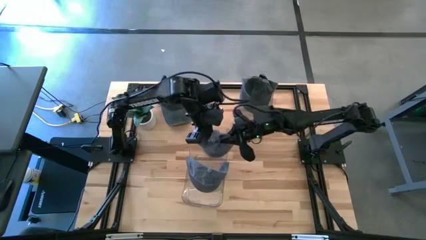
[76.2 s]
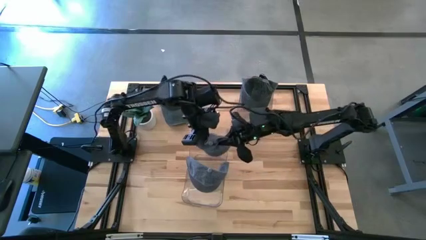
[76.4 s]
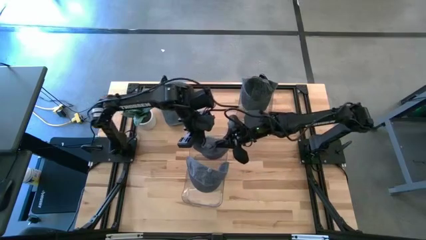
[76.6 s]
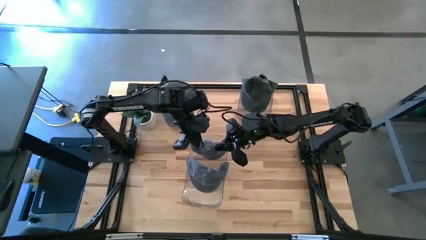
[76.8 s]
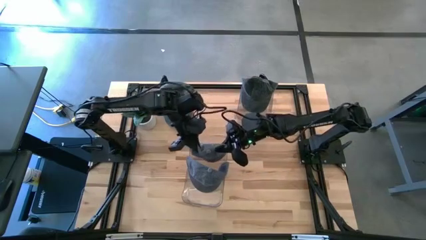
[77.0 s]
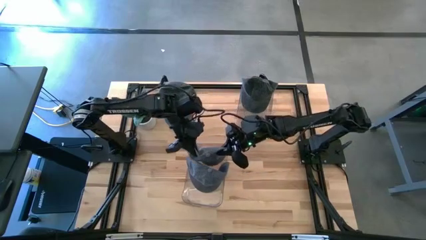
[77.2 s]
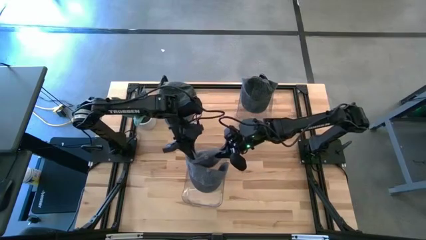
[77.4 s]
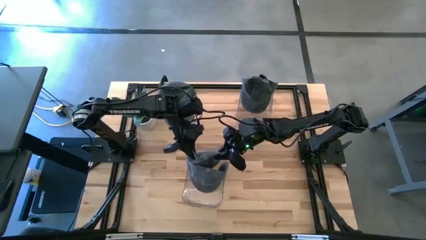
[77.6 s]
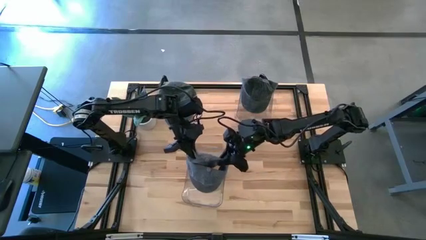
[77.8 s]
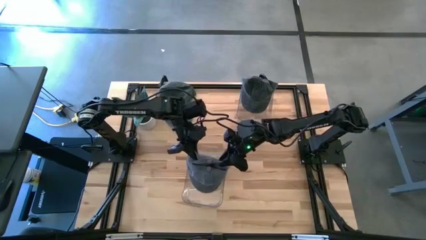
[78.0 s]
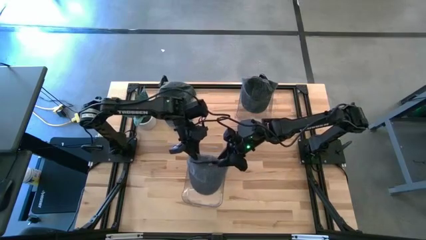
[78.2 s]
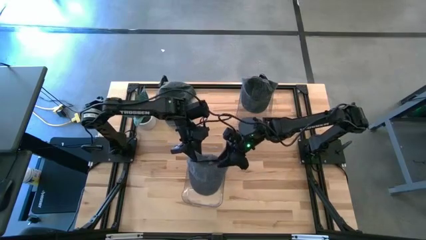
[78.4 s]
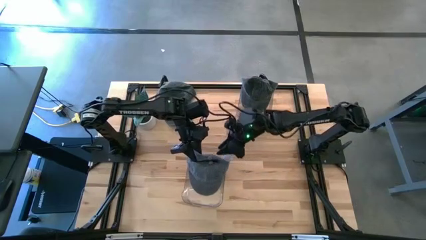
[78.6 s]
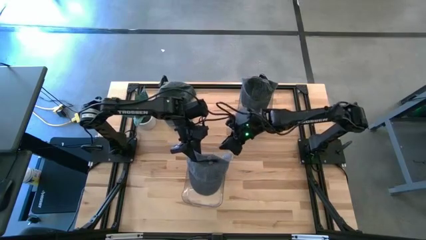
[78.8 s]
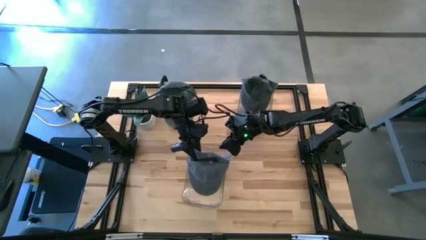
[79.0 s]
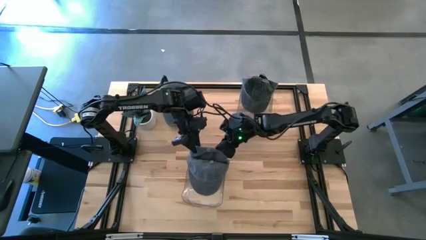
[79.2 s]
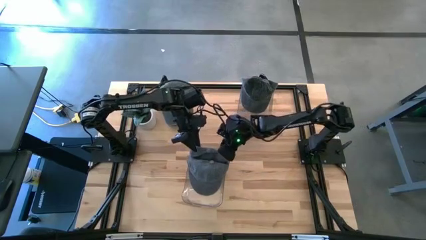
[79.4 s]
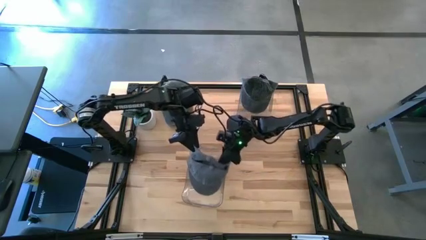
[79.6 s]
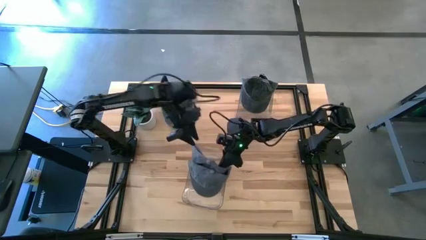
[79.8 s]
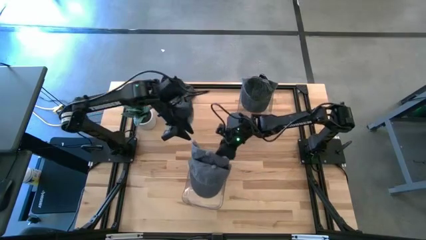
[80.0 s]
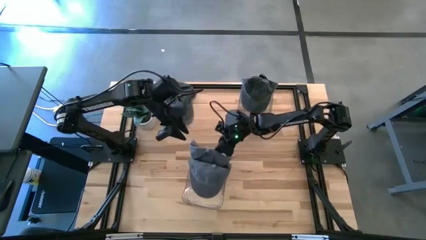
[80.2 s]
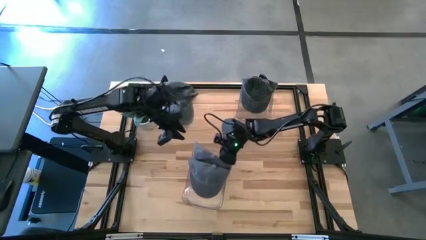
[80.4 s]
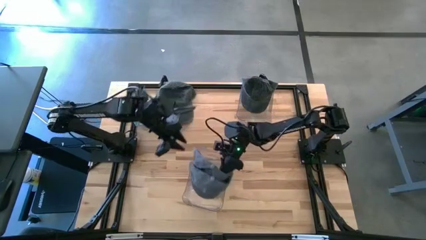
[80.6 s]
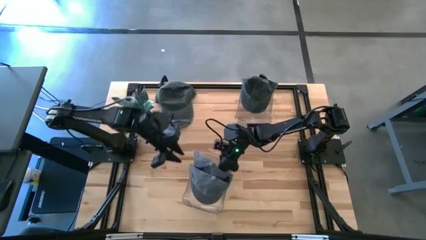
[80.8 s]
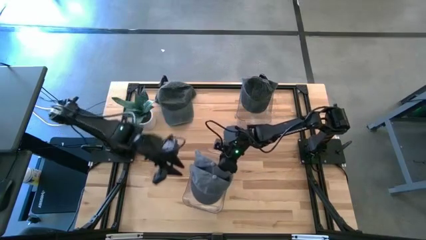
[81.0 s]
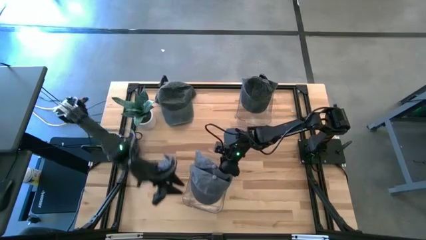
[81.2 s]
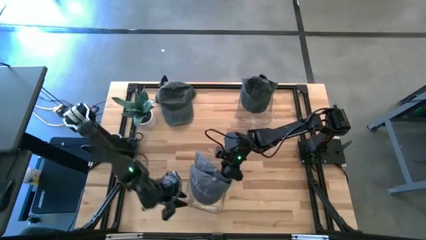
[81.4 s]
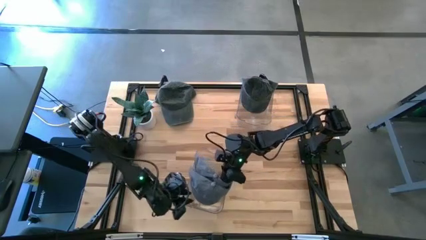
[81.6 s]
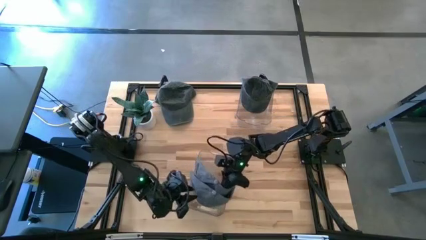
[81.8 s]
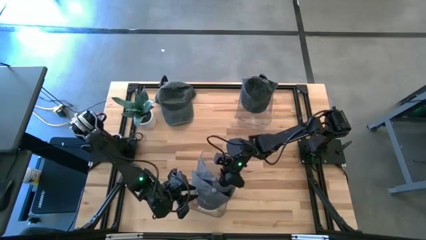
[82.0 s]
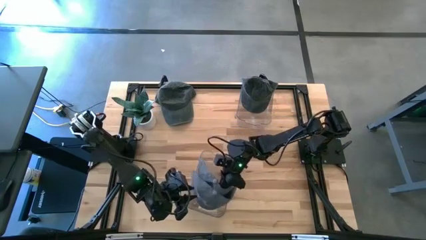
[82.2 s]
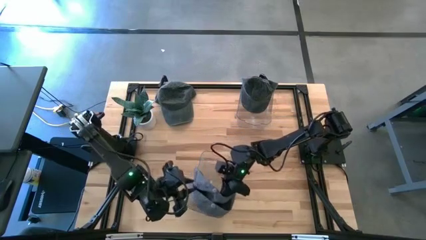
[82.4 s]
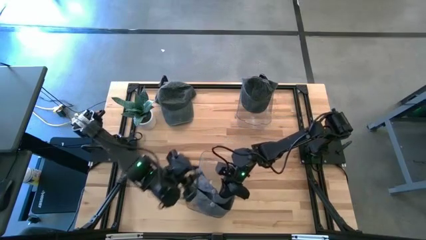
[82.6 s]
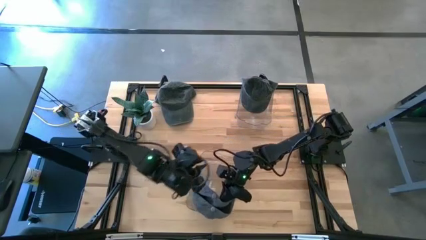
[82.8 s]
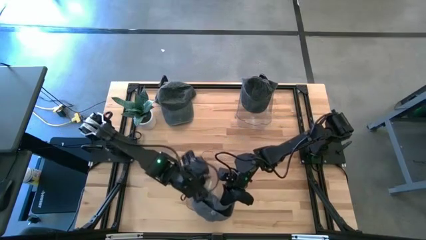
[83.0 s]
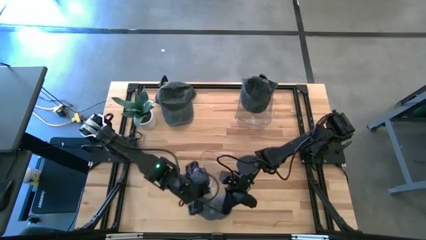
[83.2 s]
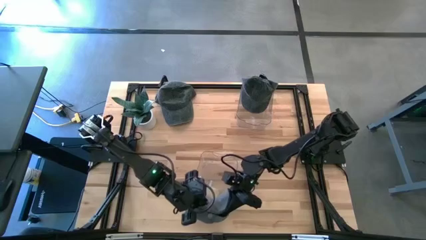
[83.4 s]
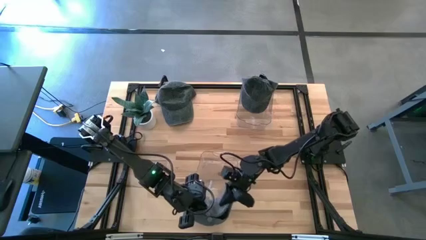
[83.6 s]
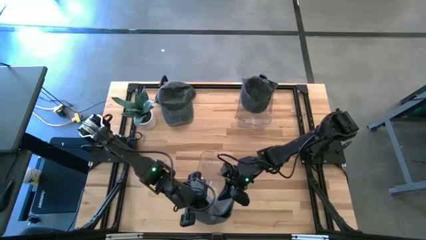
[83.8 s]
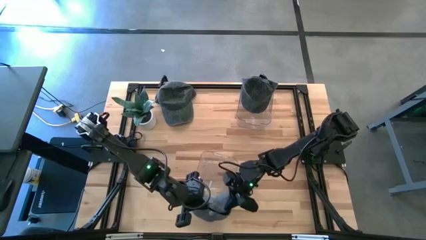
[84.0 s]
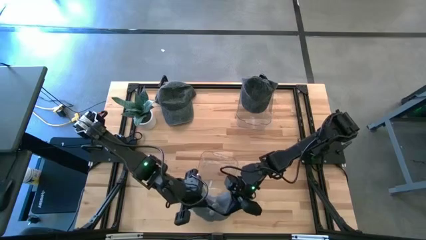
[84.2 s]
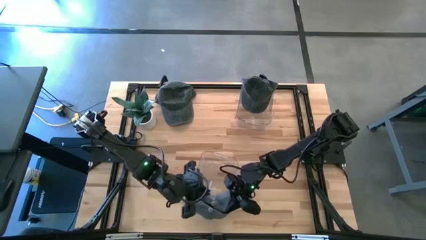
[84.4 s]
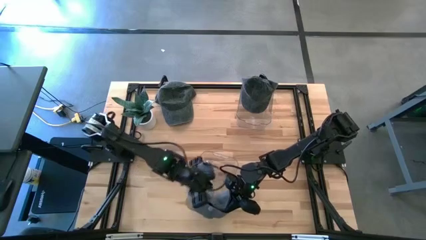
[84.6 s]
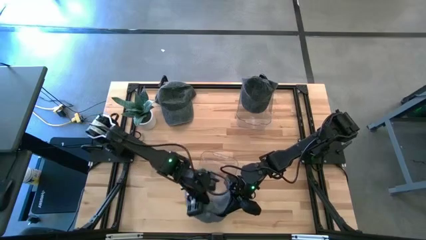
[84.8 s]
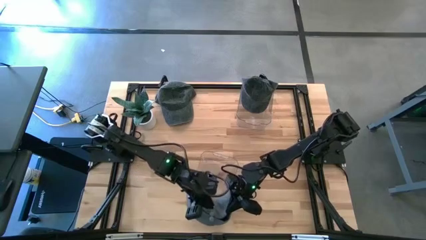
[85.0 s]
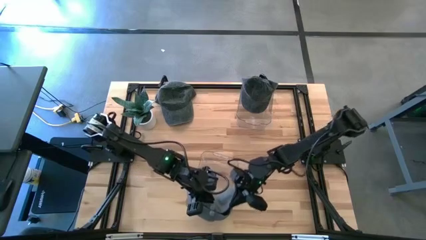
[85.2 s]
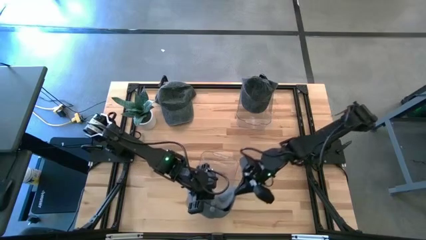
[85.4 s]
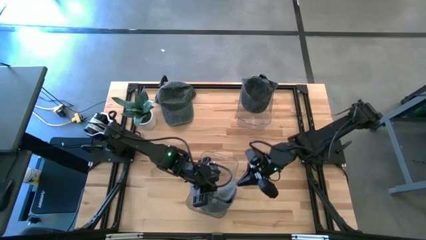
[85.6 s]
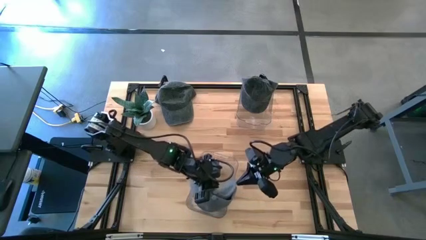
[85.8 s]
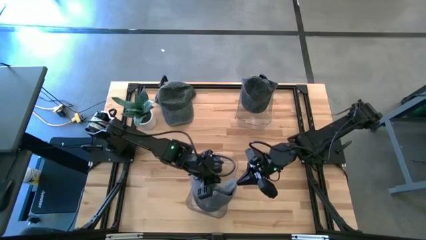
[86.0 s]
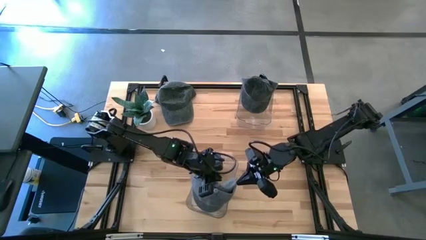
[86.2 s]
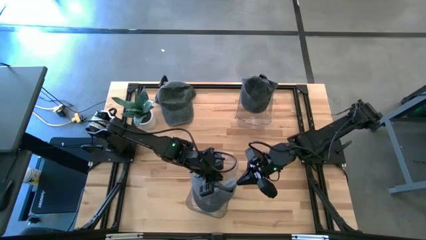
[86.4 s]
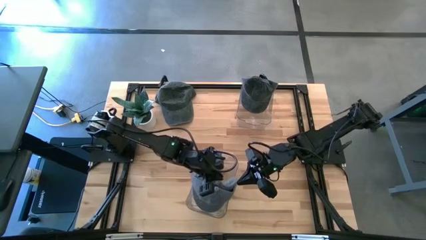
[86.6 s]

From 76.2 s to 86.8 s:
Task: Pick & Place hat
Put the gray cap into the bottom transparent bin

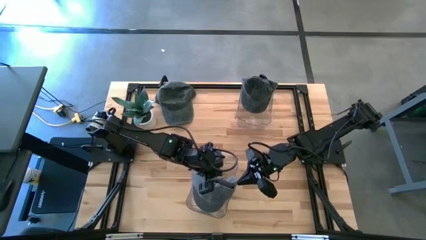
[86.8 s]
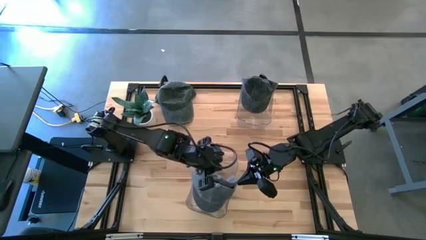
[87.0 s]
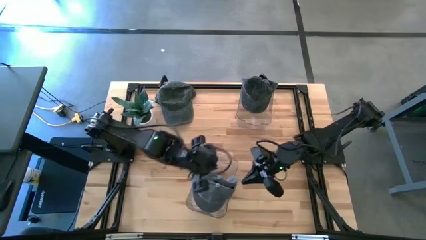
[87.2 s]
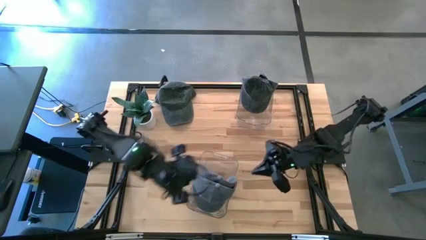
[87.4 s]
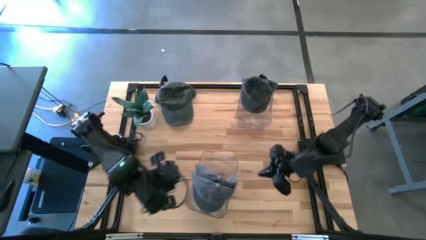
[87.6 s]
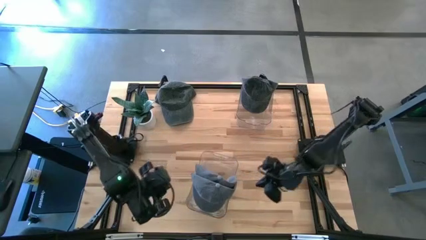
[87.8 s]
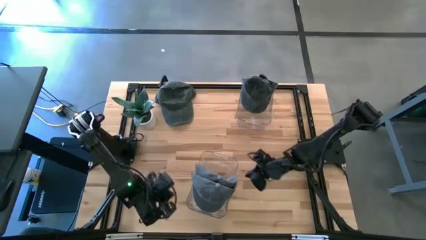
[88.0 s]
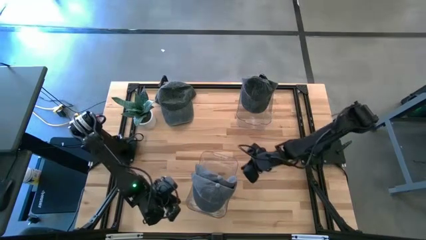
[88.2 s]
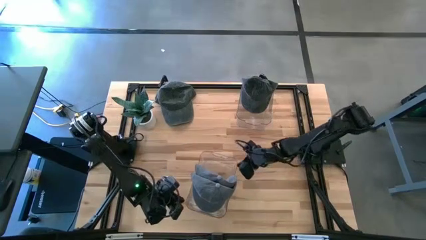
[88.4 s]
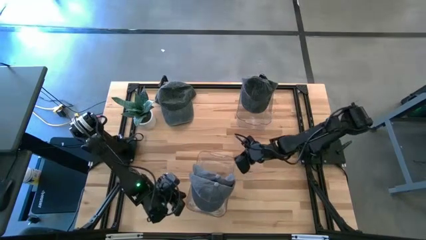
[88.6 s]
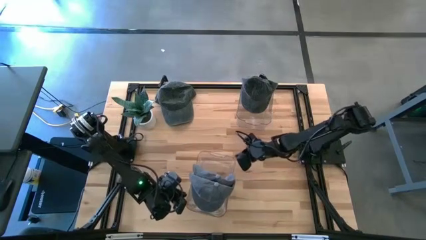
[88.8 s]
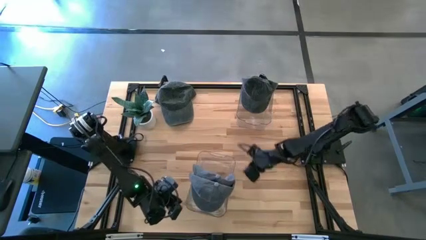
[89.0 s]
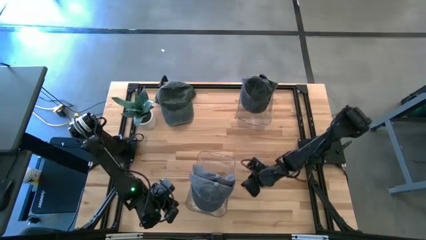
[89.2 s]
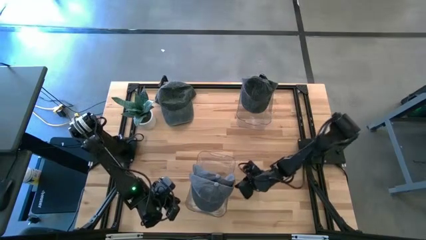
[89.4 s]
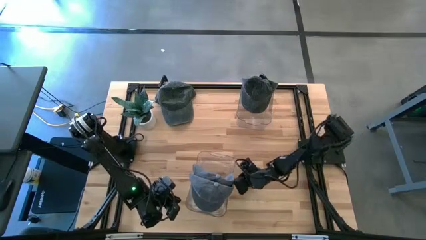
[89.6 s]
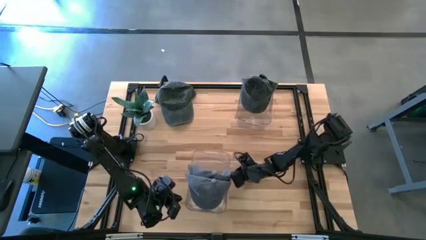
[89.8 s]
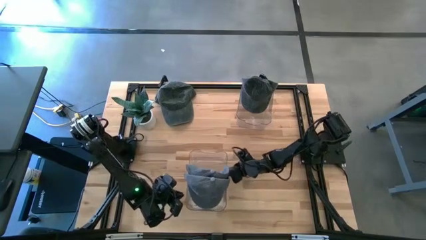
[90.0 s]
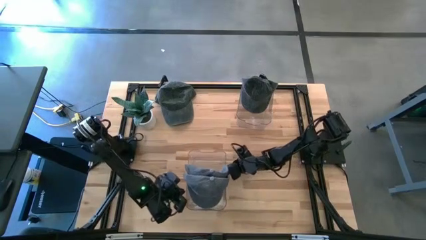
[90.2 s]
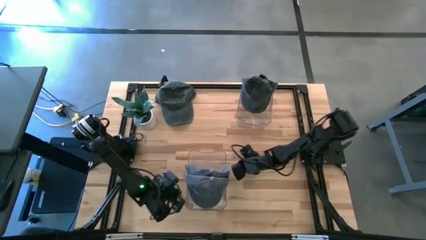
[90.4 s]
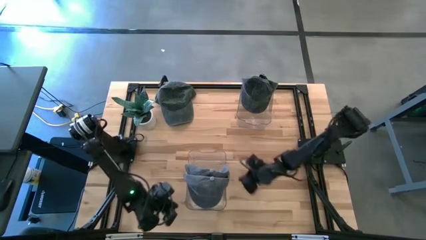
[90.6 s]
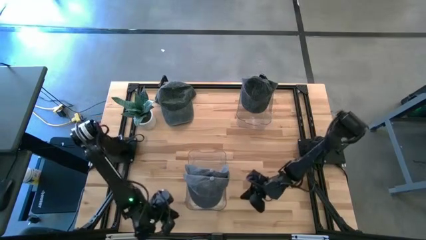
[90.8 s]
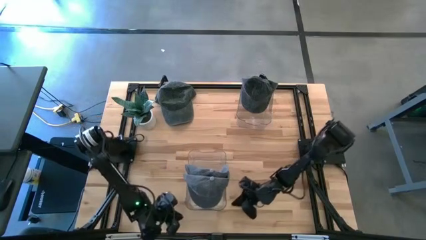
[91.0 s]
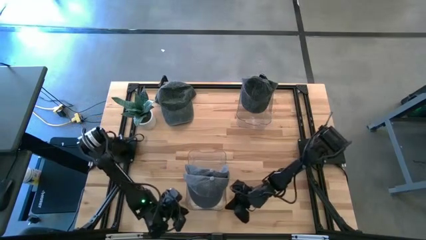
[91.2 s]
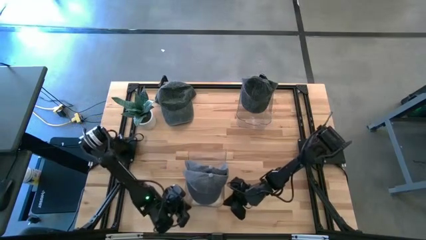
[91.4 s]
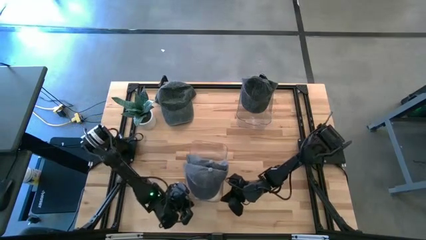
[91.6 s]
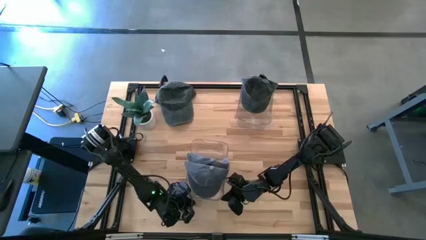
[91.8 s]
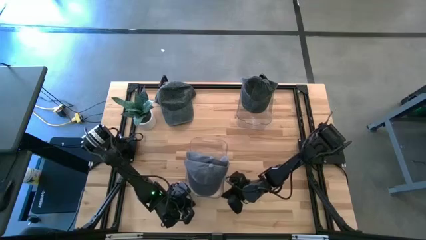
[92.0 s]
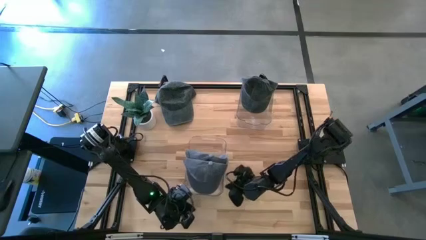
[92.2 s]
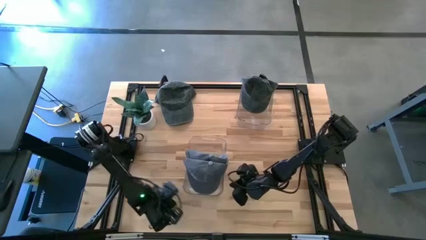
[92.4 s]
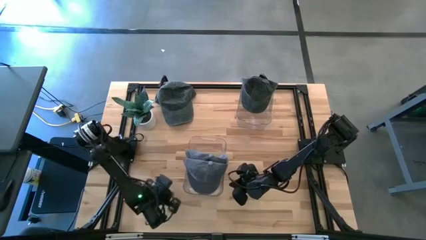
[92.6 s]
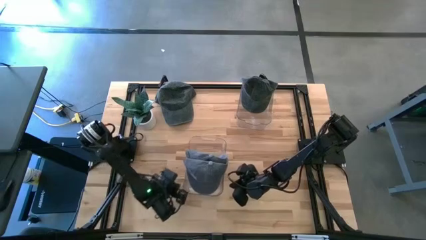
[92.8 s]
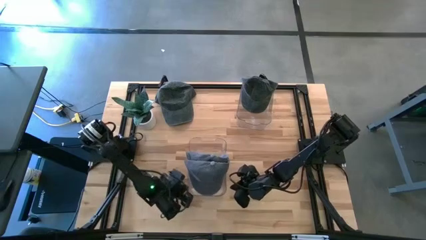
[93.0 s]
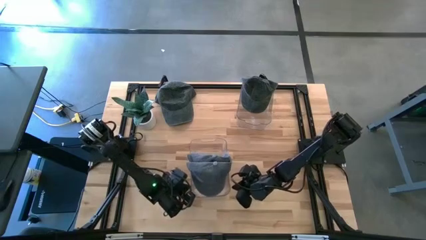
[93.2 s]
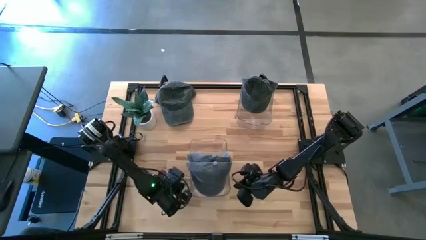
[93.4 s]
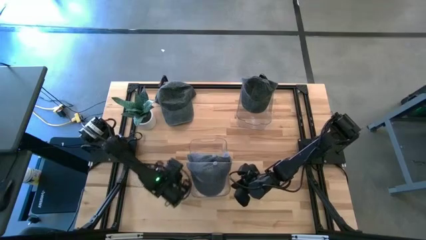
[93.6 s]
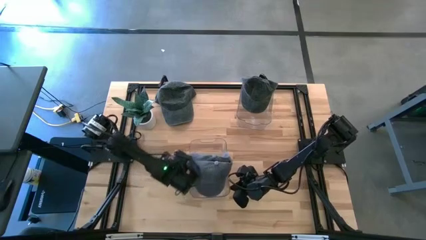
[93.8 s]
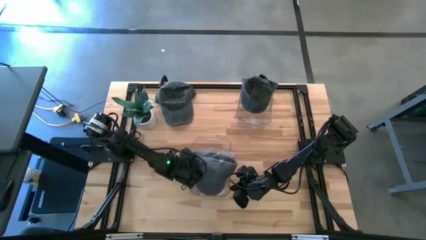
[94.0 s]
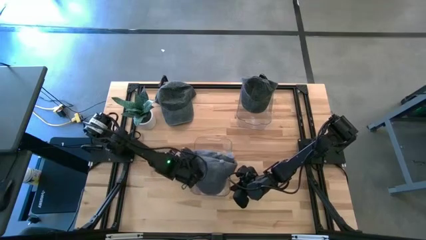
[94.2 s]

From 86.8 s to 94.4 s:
Adjust the bottom transparent bin
